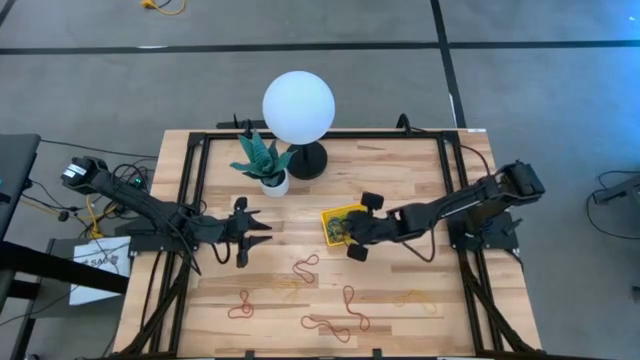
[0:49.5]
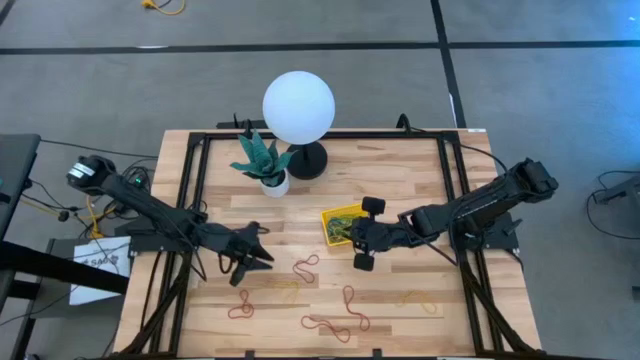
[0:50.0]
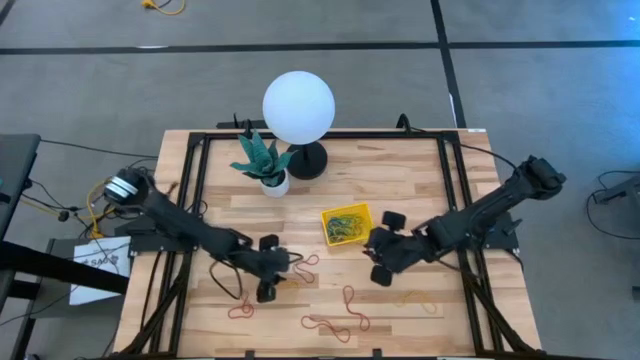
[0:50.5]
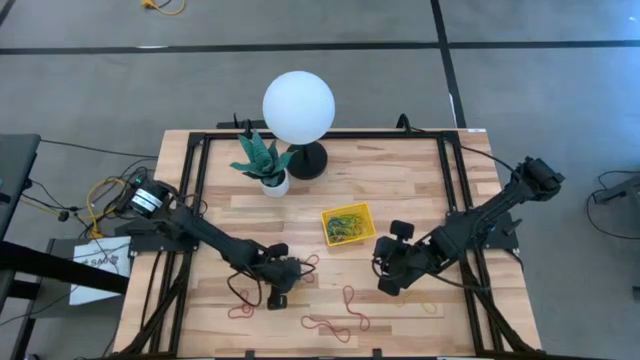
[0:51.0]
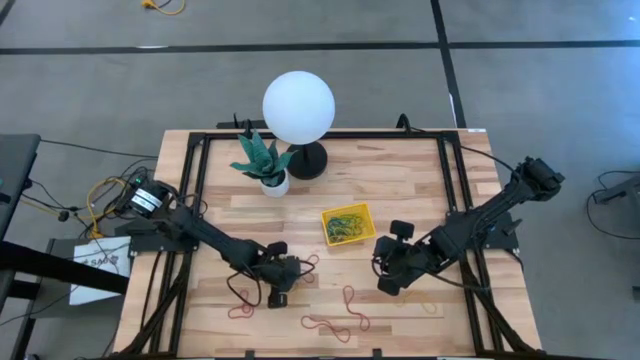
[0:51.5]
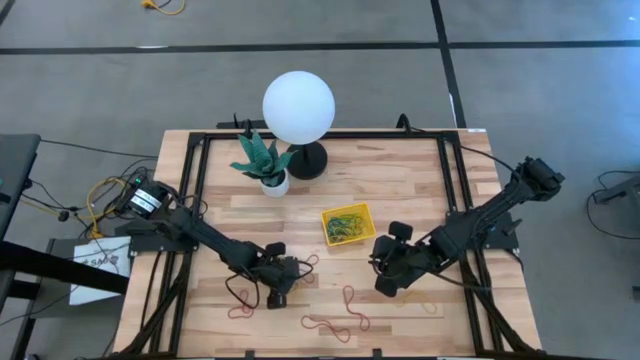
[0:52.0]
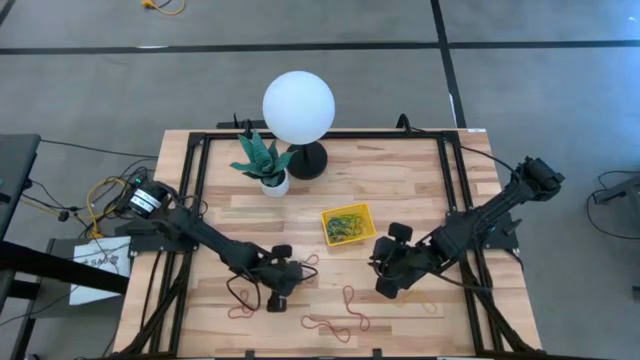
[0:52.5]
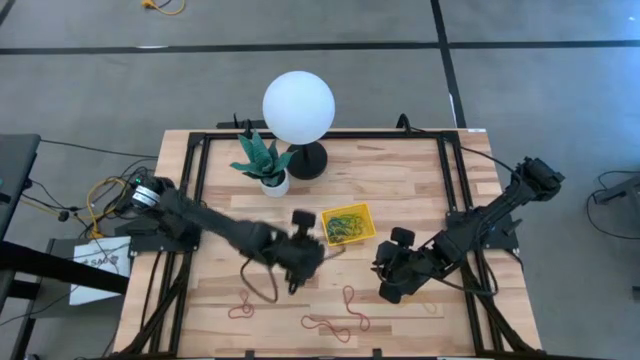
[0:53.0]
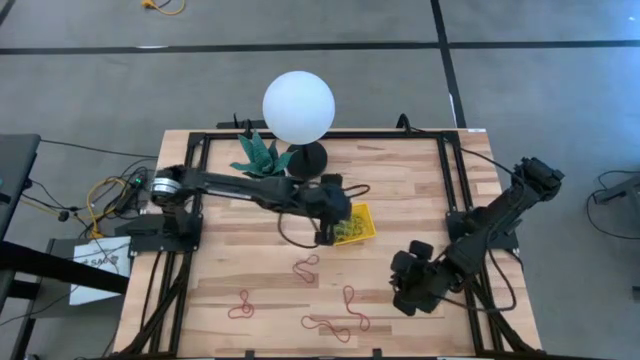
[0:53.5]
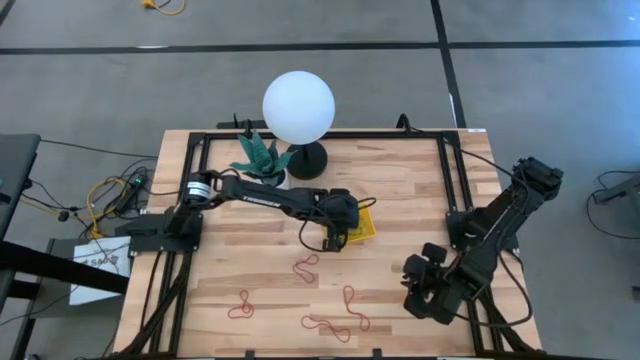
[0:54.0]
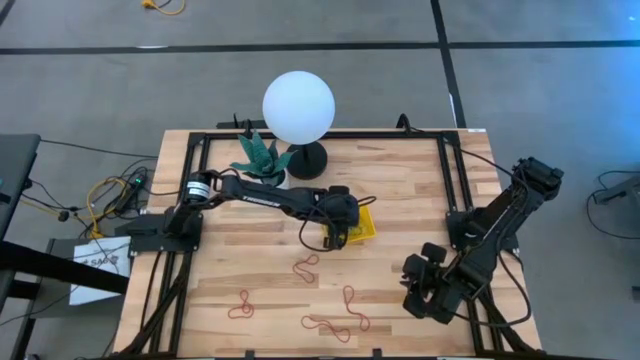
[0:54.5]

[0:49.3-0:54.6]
Task: Pick and place items into bin
Put the yellow rubber band into the yellow bin

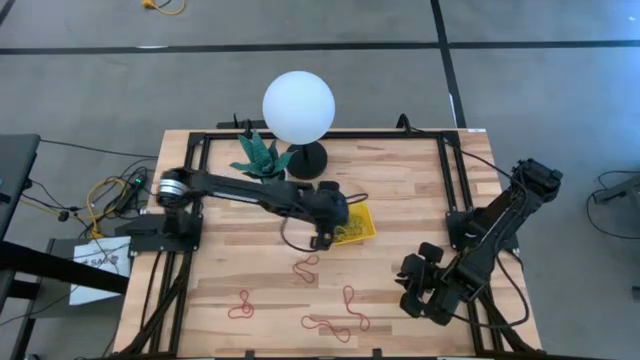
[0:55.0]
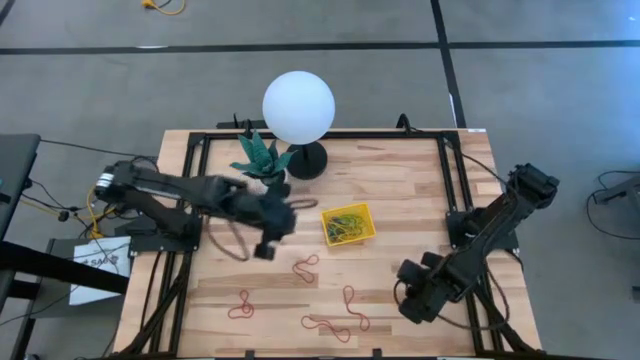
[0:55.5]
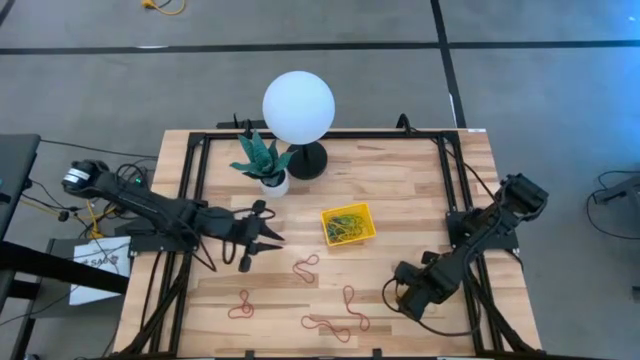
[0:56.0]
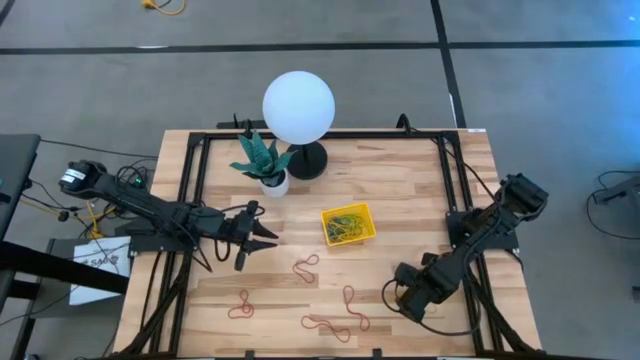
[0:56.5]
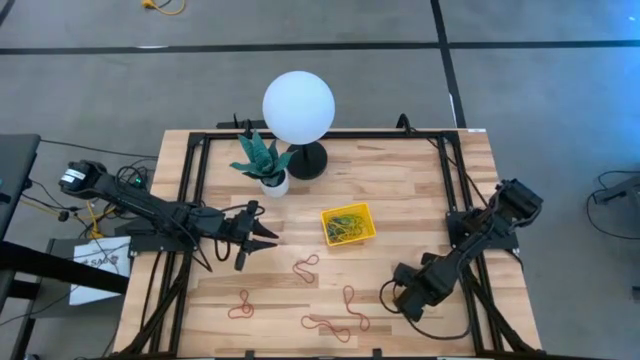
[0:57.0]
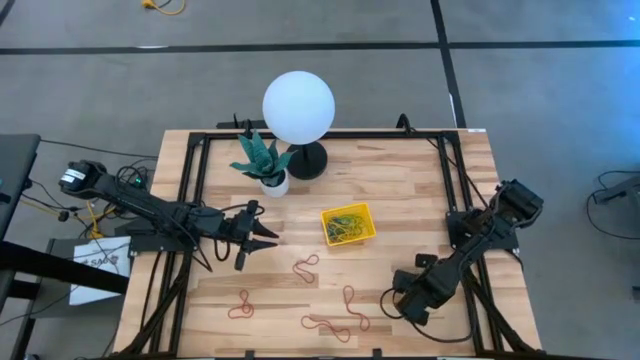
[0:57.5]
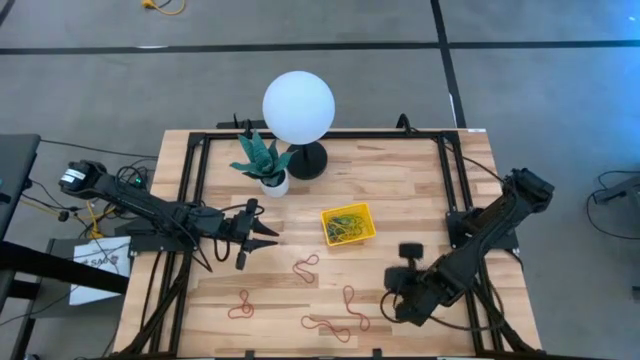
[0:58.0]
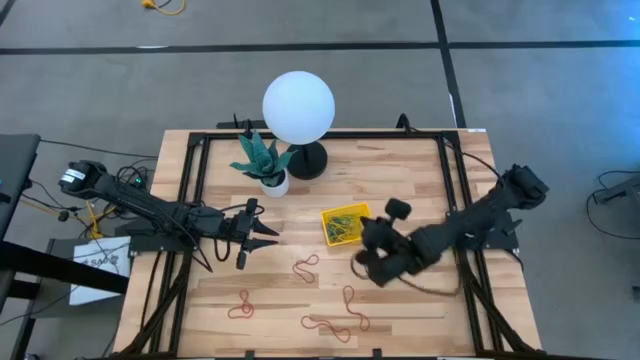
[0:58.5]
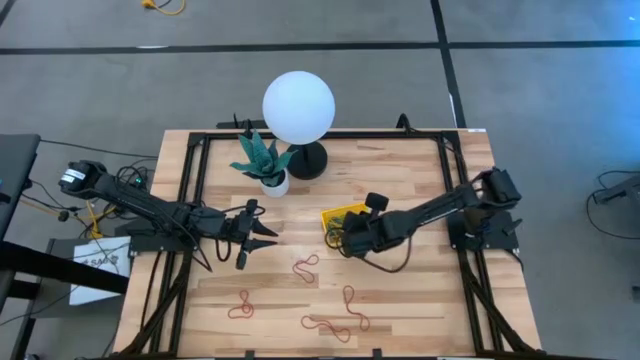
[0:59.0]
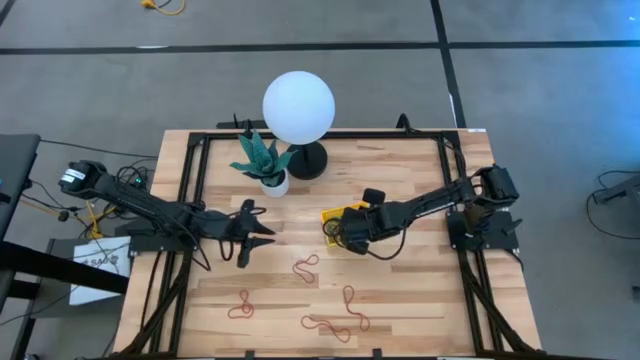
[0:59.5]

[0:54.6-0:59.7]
Put the yellow rubber band into the yellow bin

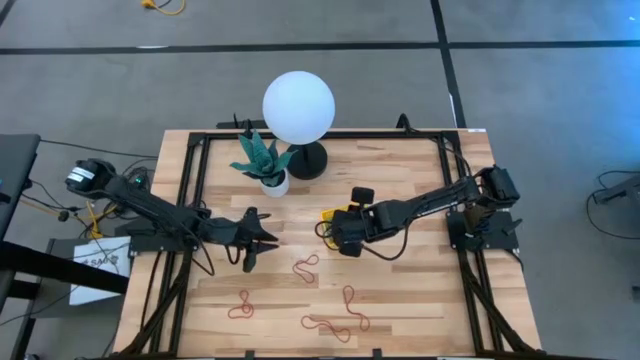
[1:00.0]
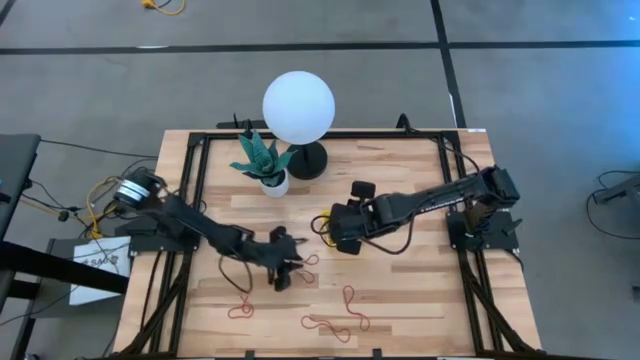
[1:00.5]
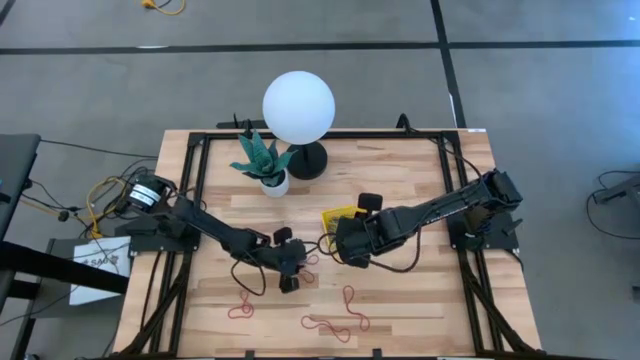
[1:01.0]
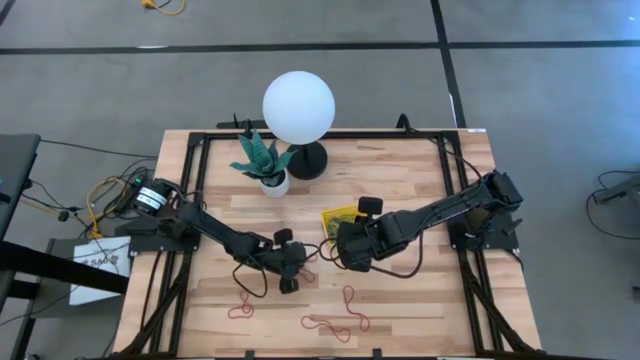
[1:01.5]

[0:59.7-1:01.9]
Put the red rubber band into the yellow bin

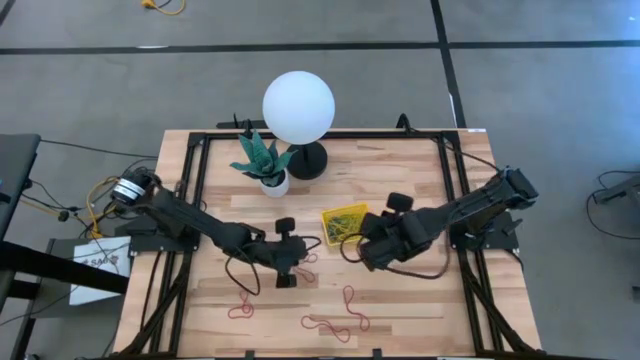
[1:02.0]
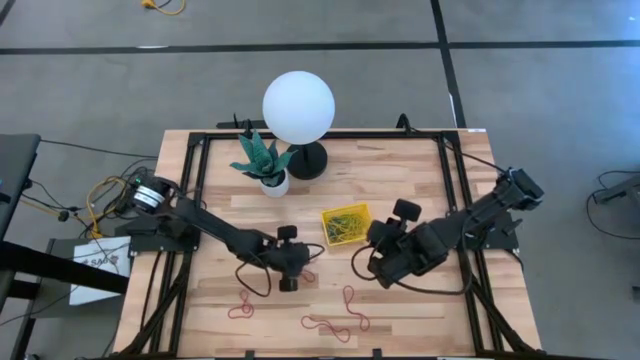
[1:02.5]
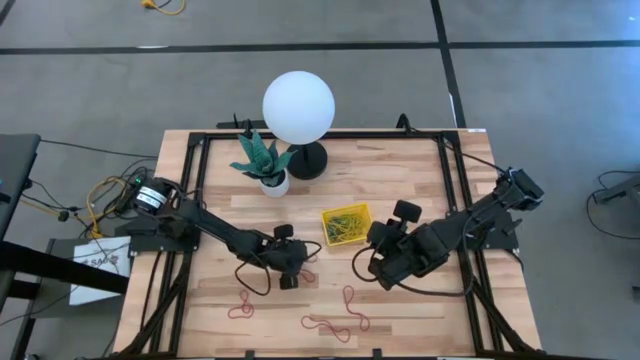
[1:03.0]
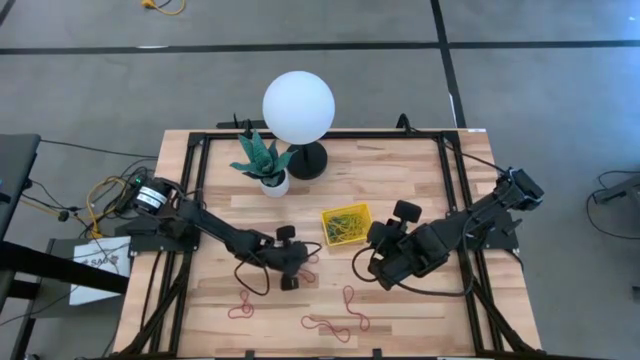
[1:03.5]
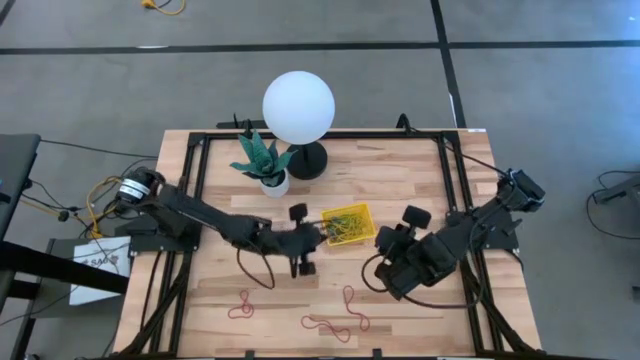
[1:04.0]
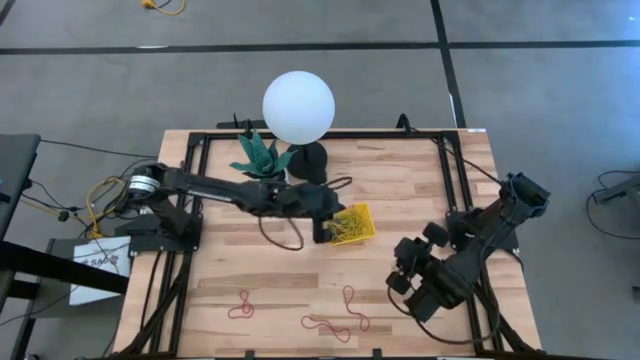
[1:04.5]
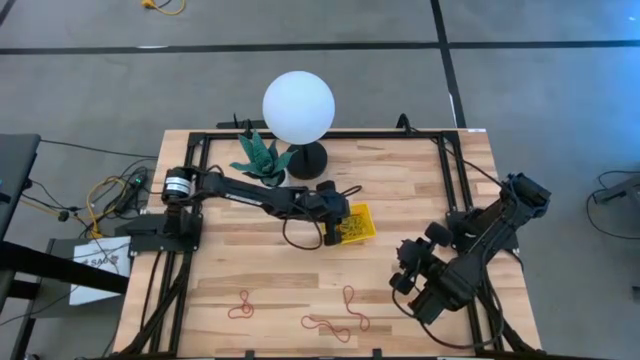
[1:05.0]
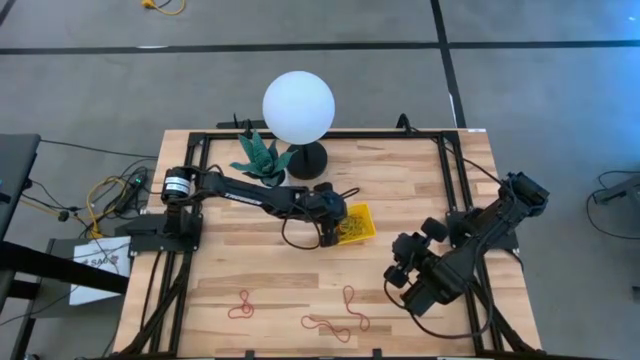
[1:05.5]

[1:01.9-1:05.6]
Put the red rubber band into the yellow bin

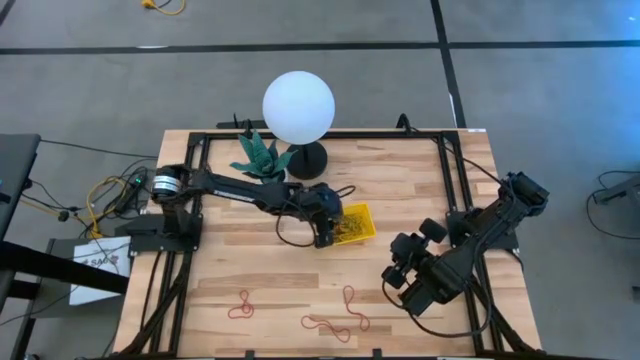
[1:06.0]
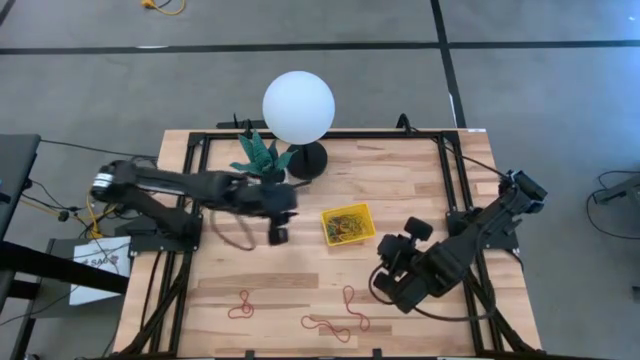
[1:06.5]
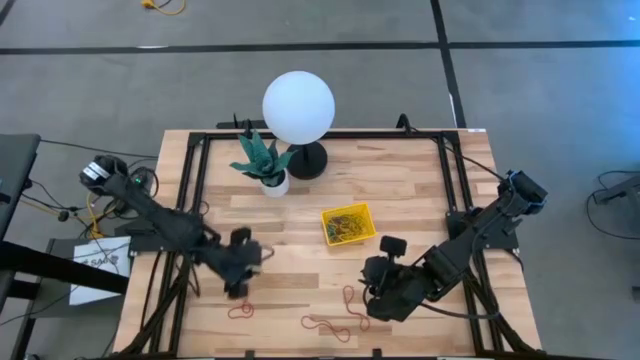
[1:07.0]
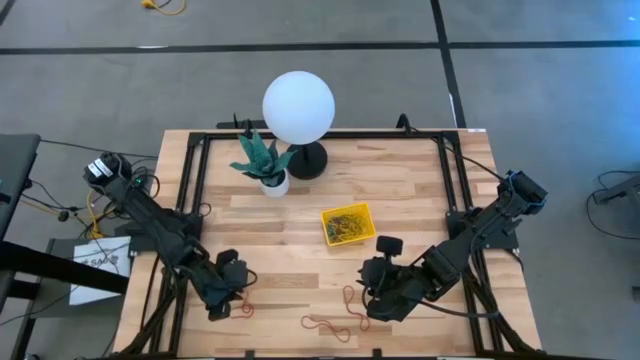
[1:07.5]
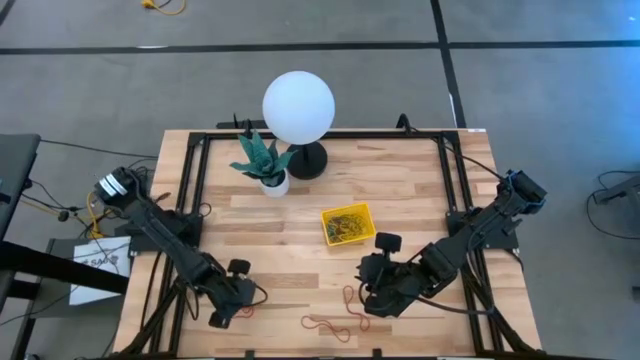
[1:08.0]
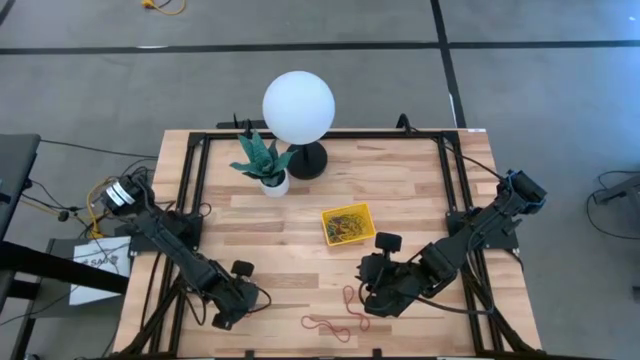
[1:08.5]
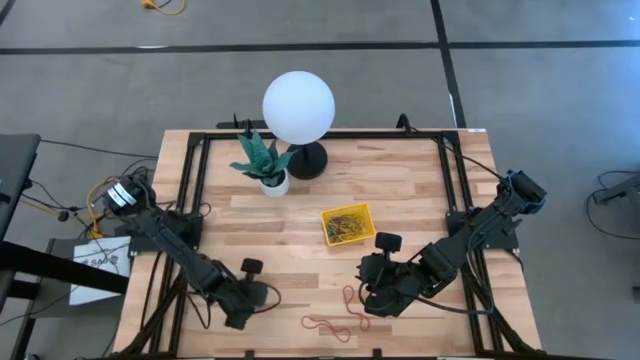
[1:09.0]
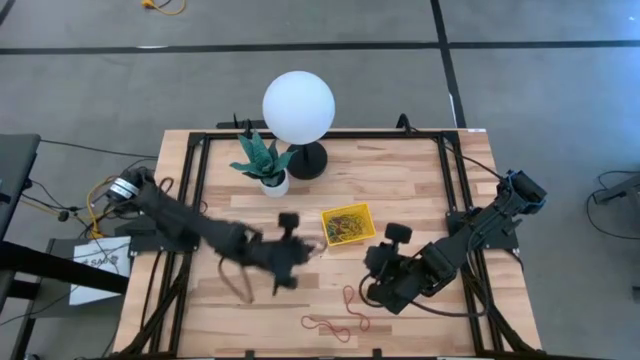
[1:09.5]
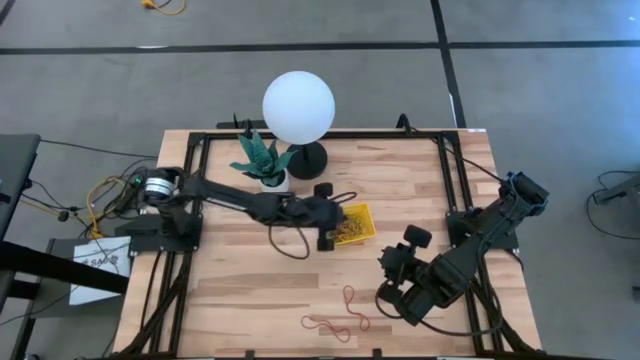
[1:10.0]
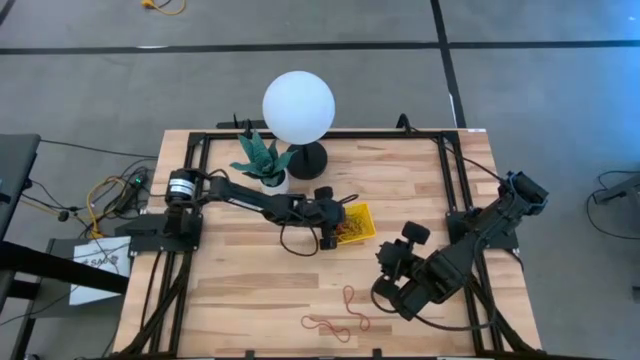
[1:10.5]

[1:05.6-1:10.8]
Put the red rubber band into the yellow bin
